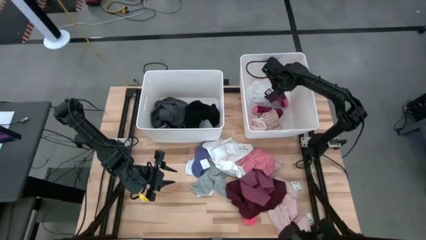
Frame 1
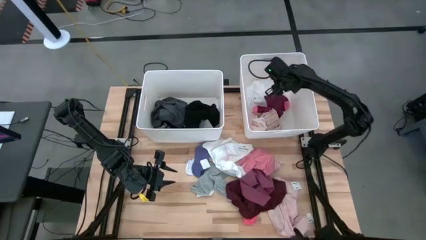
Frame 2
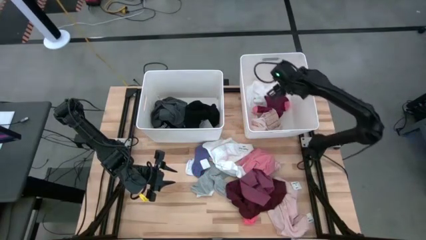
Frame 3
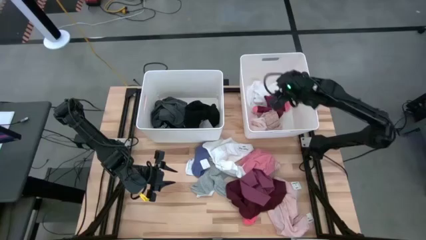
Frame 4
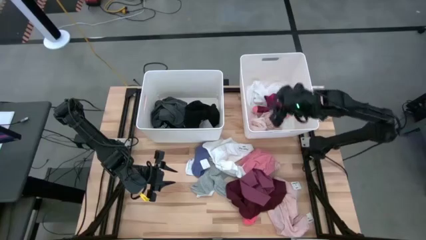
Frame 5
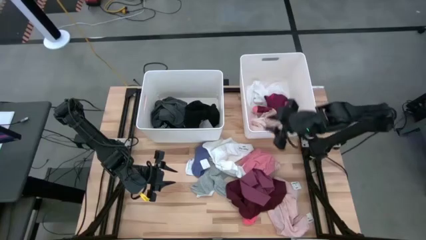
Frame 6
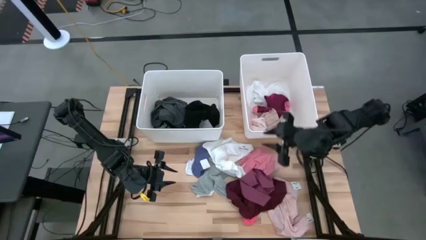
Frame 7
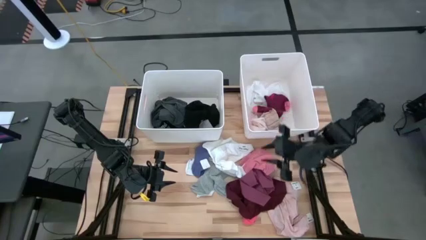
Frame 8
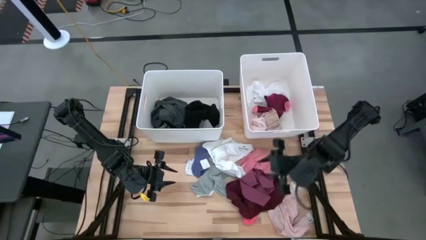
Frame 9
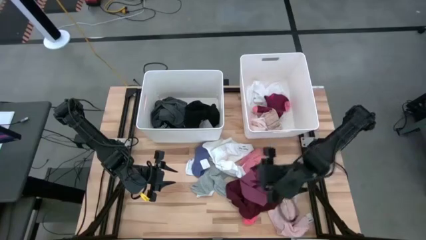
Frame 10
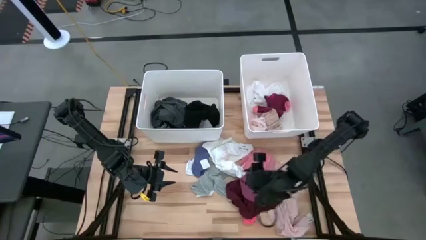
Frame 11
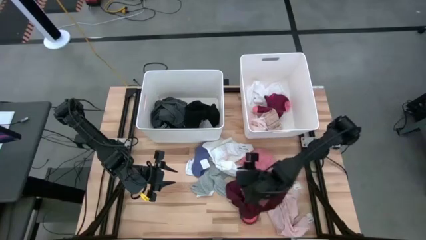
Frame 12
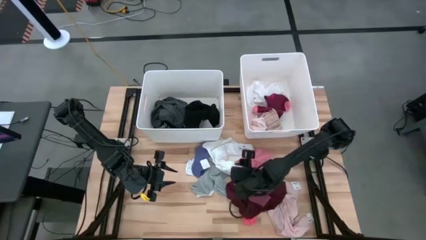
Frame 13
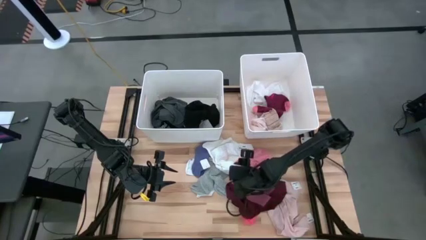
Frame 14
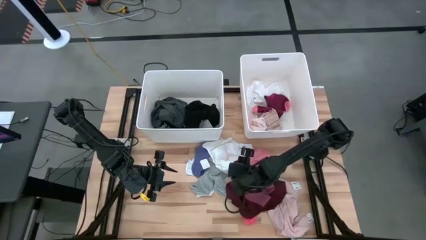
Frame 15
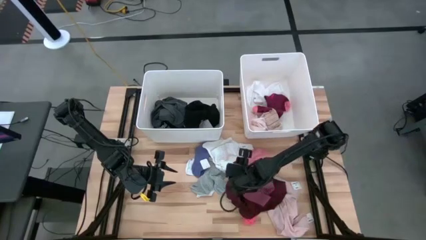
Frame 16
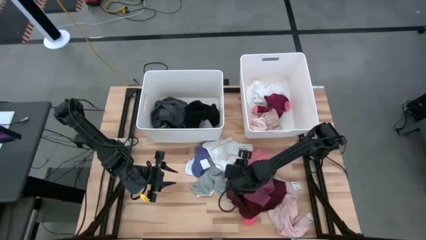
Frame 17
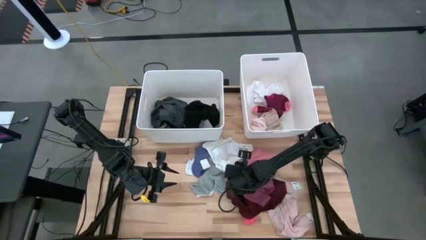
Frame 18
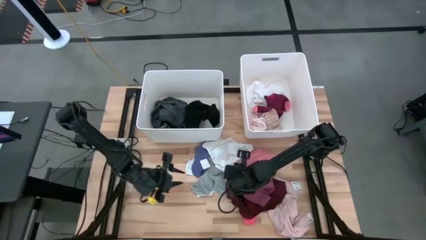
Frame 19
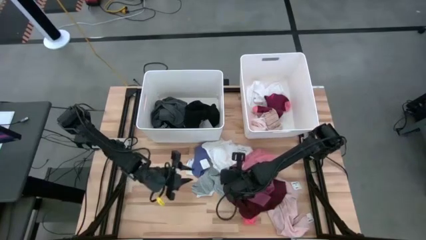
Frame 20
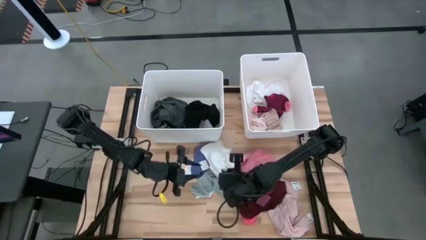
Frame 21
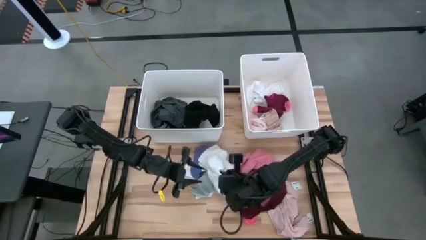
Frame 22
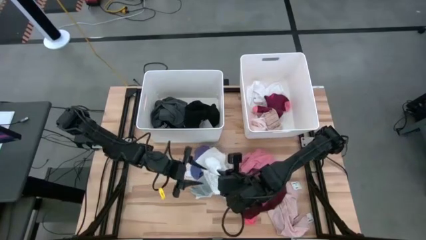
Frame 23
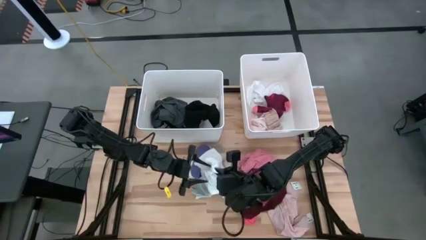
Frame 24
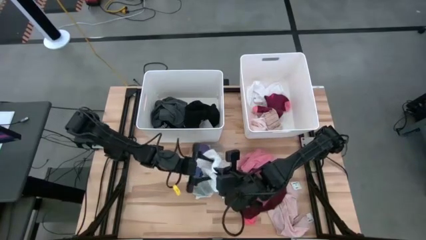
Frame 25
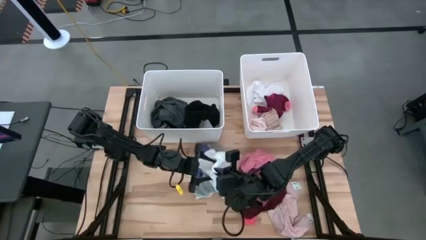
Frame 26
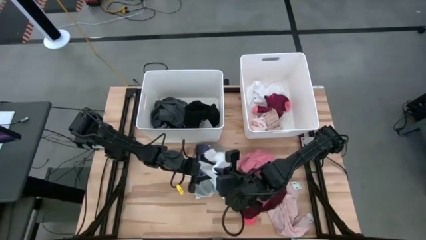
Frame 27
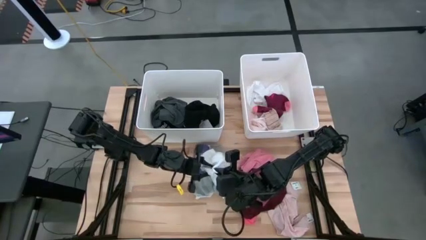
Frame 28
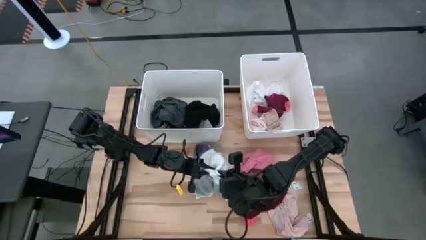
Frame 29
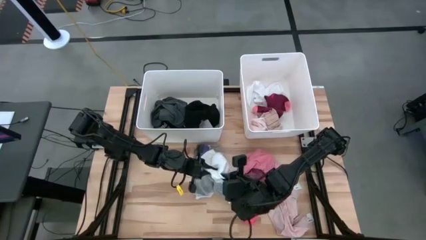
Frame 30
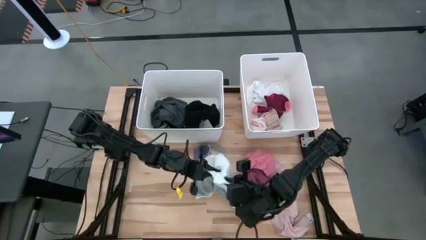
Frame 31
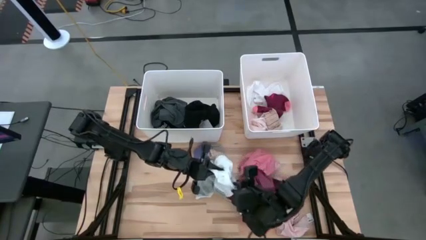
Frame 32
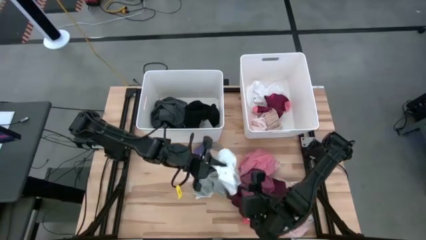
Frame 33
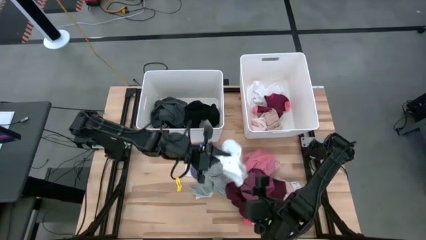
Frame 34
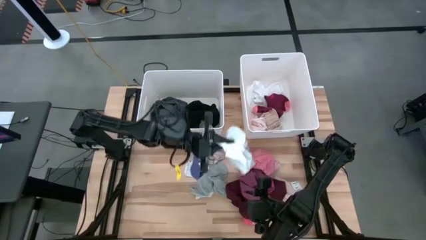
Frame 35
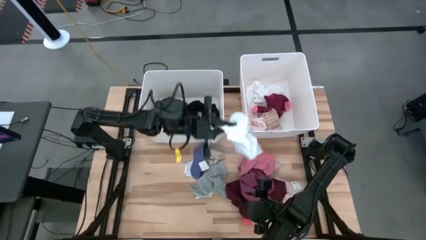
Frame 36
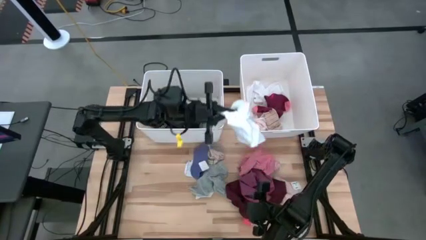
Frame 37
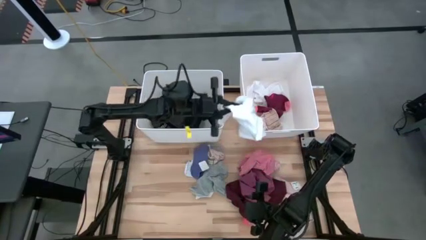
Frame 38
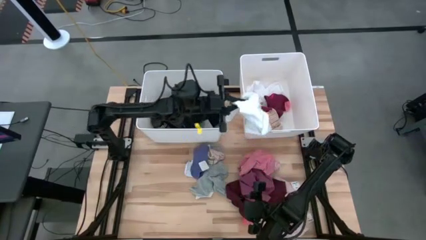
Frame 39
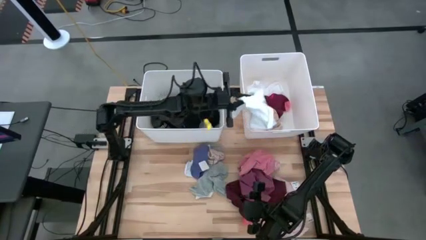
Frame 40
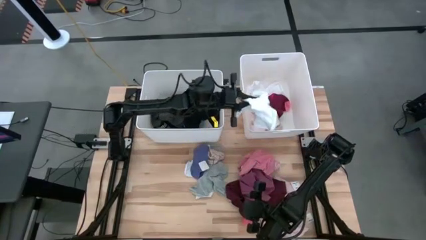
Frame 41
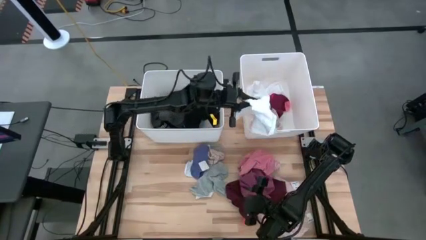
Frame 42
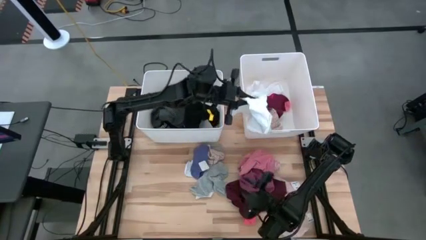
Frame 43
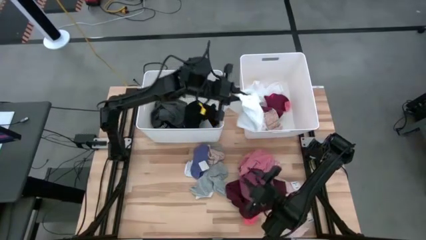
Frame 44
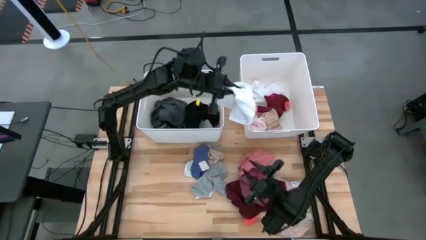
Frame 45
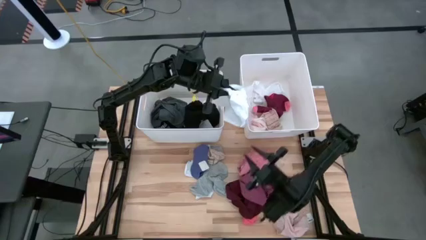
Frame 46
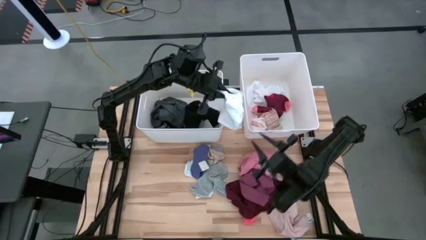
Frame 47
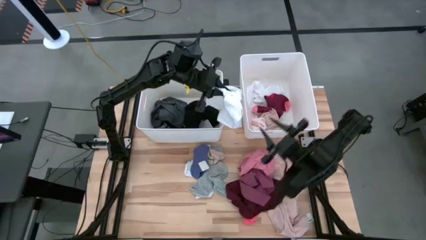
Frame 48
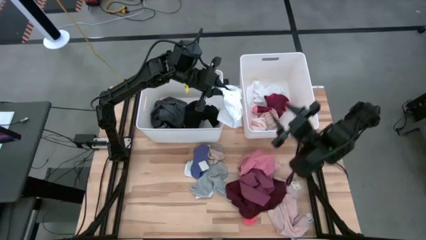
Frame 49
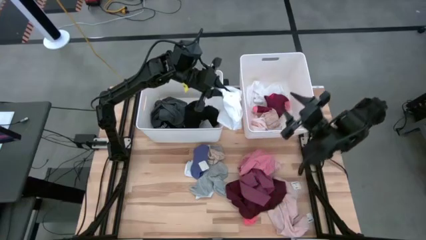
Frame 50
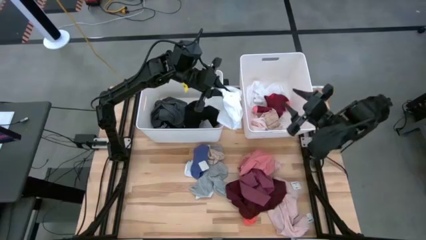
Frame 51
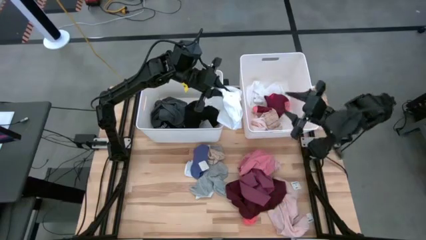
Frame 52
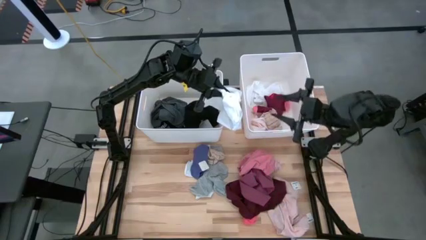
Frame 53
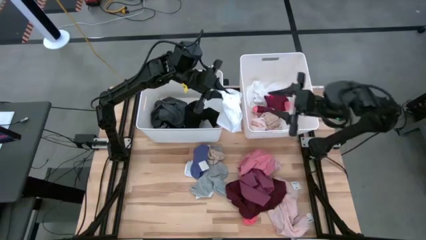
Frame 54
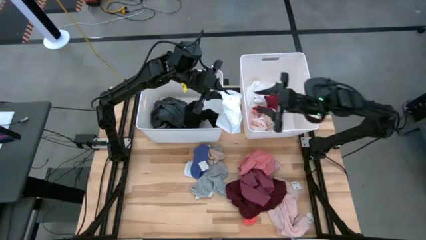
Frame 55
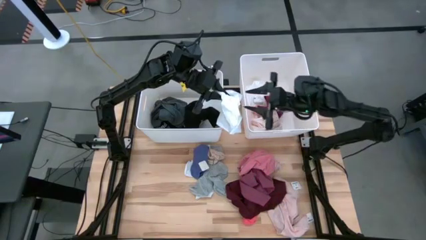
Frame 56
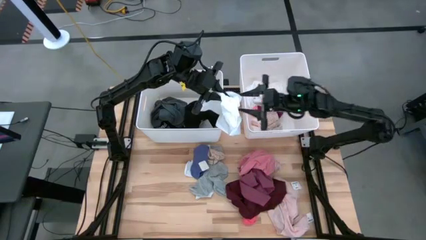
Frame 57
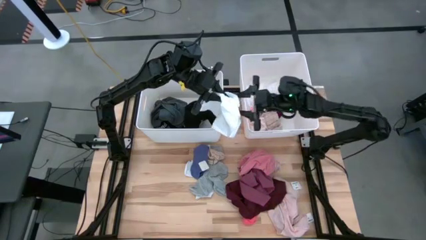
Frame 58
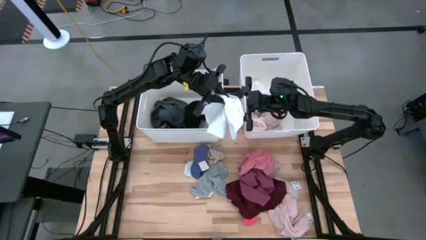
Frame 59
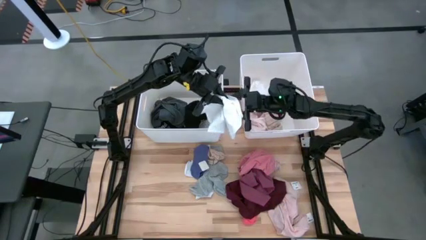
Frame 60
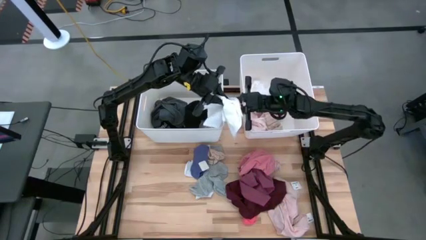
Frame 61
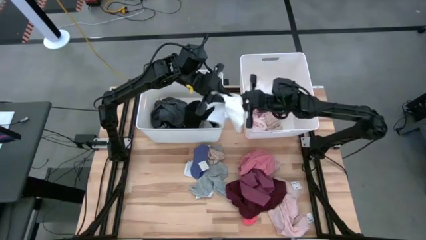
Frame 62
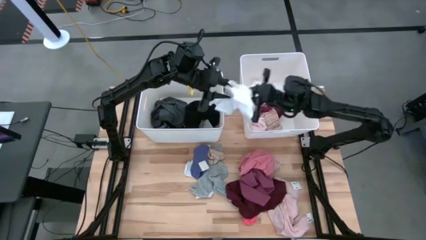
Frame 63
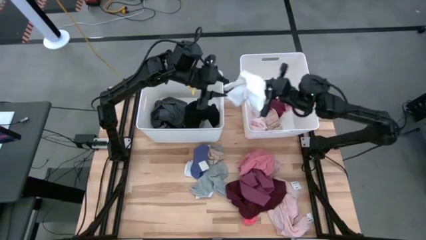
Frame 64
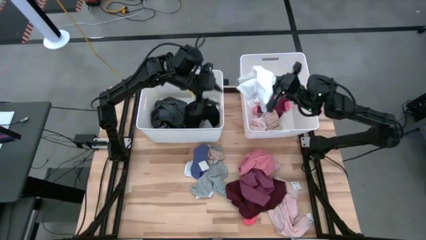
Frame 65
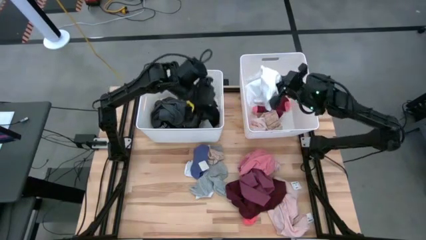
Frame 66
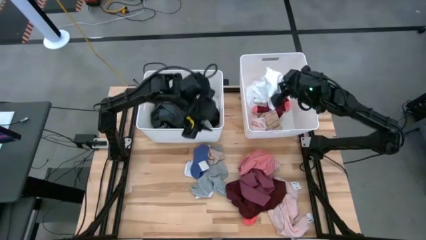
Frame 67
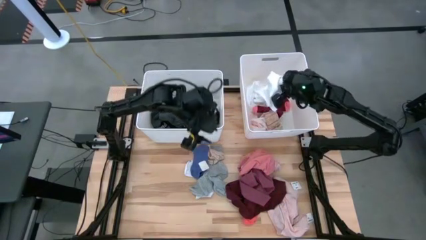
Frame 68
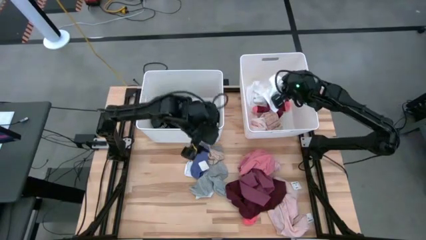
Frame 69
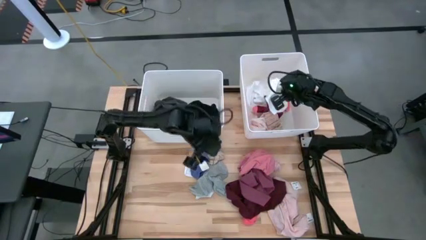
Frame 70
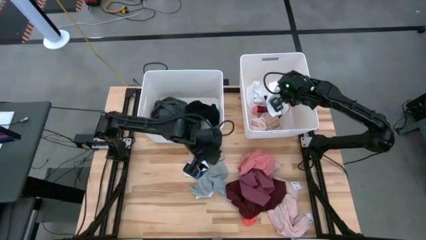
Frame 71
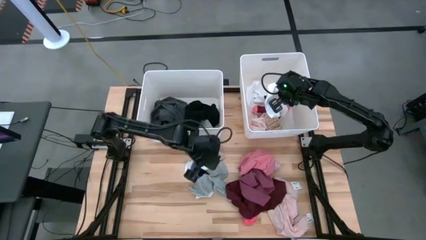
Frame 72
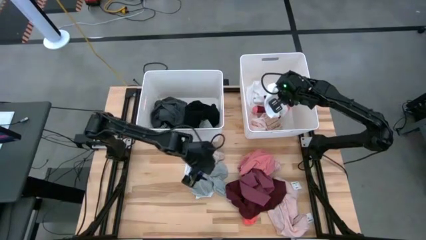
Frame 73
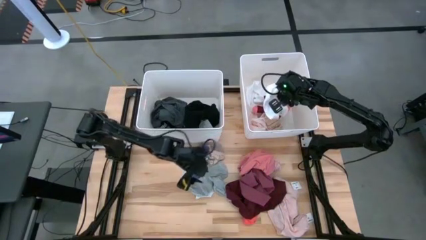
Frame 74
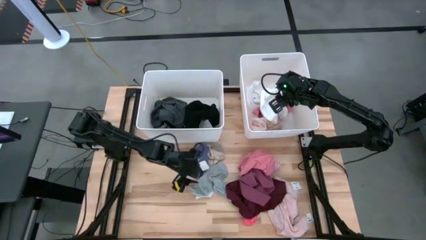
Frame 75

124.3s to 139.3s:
Task: Sort clothes
Put the white garment into the right white laundry organizer
